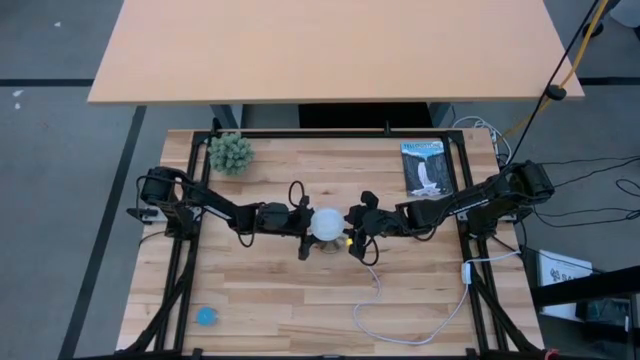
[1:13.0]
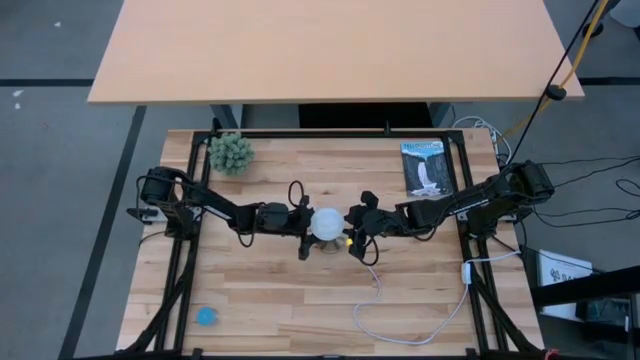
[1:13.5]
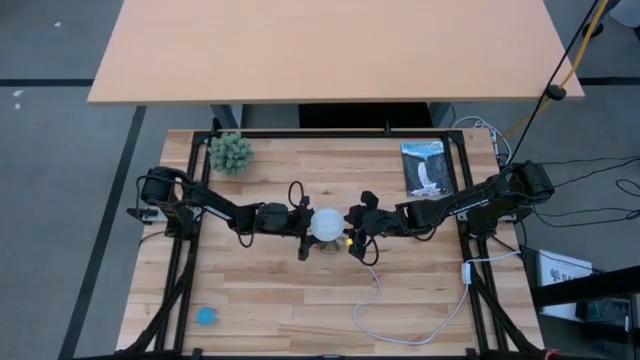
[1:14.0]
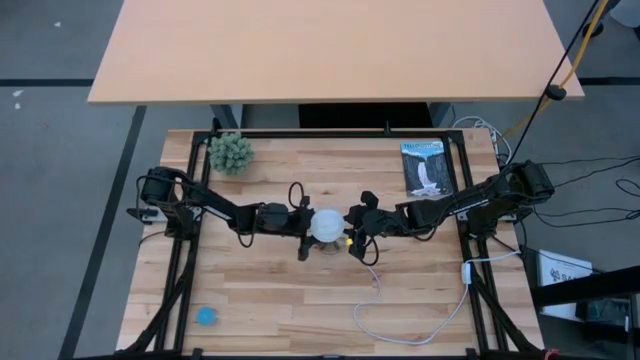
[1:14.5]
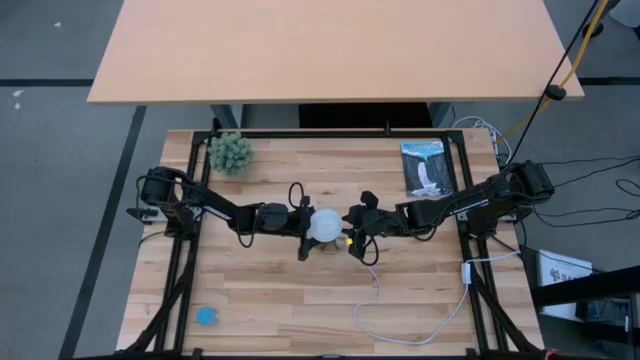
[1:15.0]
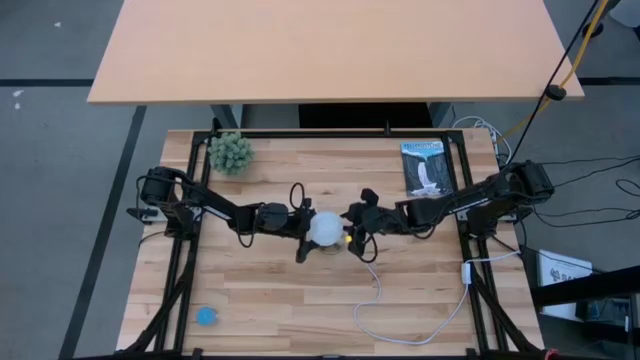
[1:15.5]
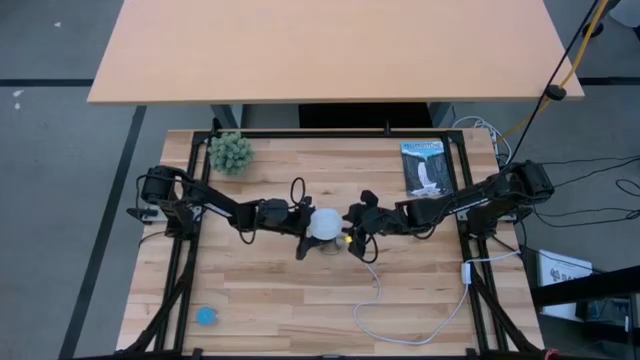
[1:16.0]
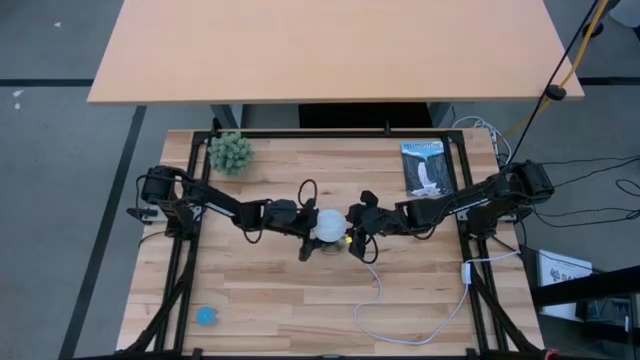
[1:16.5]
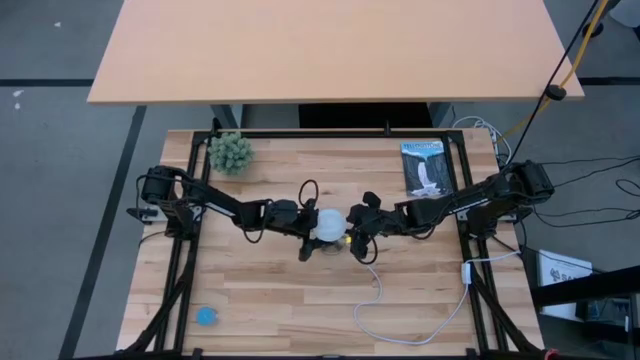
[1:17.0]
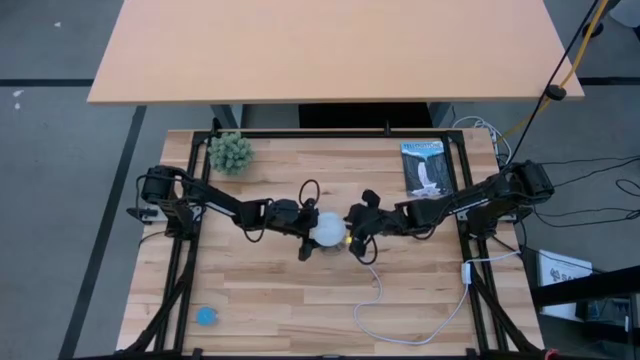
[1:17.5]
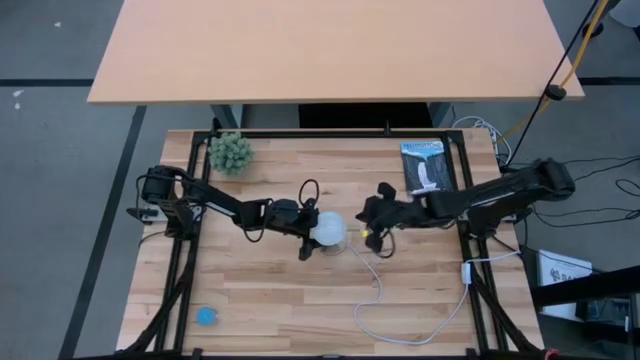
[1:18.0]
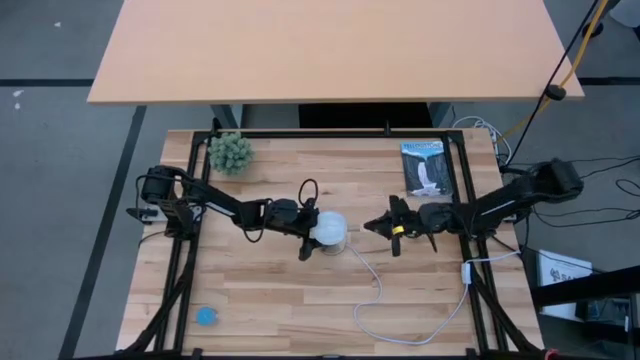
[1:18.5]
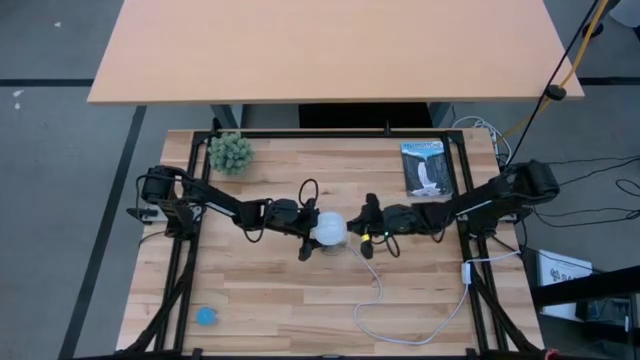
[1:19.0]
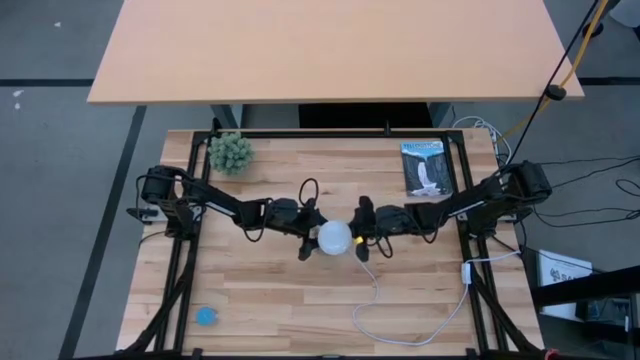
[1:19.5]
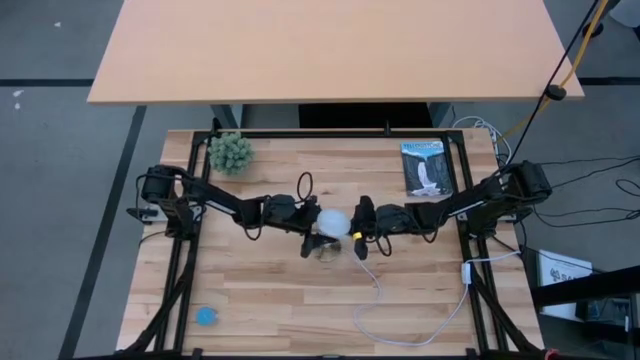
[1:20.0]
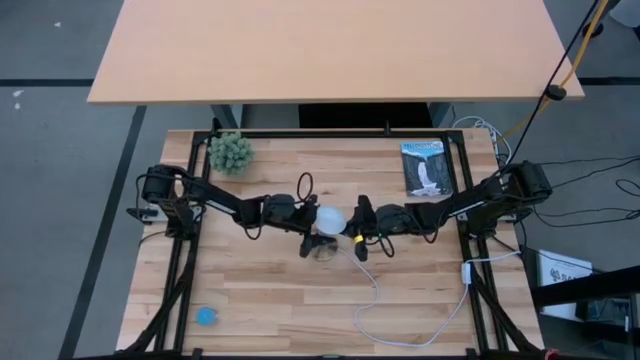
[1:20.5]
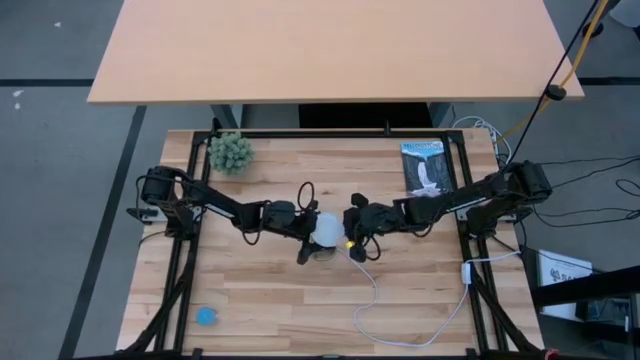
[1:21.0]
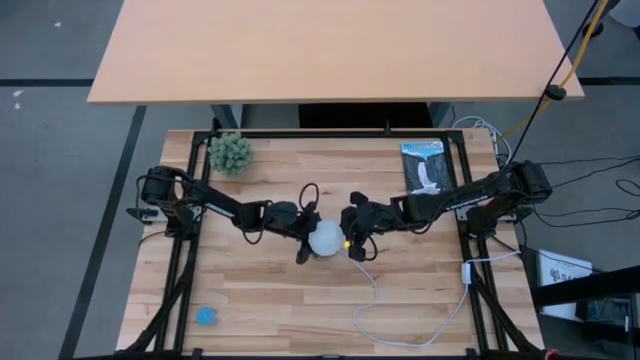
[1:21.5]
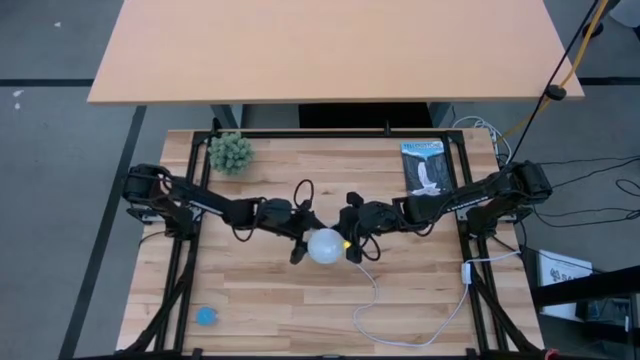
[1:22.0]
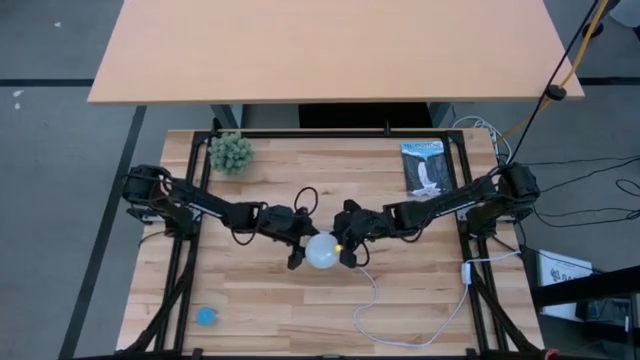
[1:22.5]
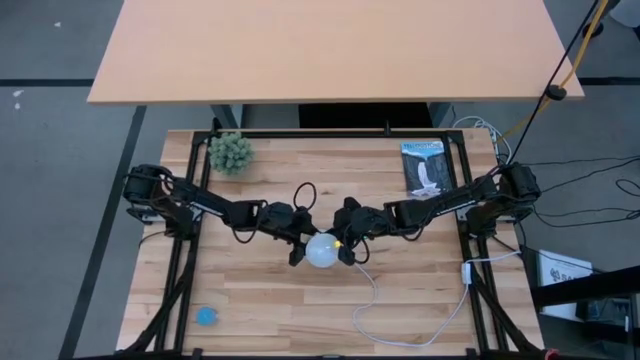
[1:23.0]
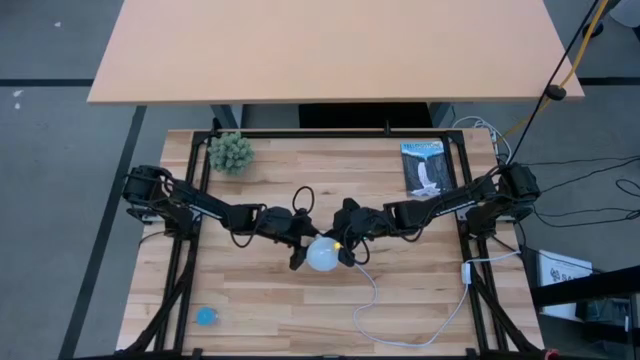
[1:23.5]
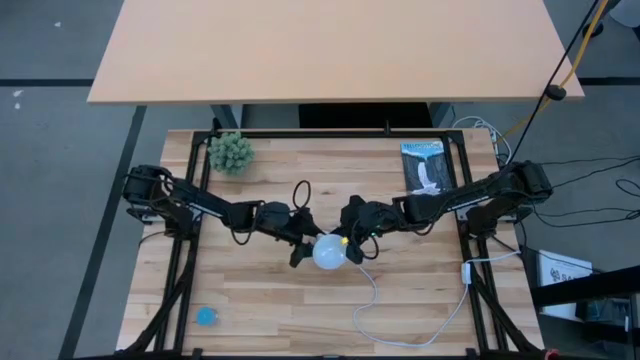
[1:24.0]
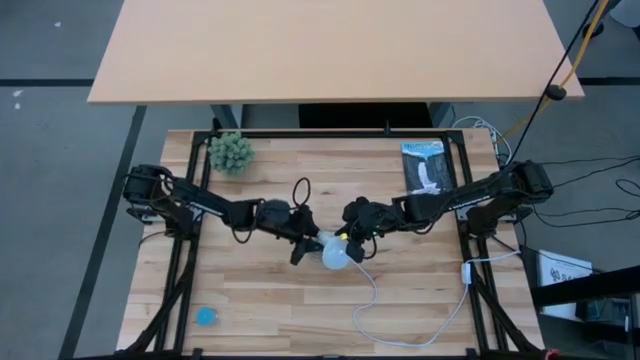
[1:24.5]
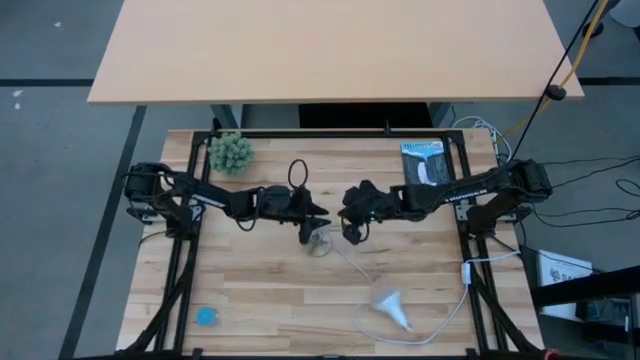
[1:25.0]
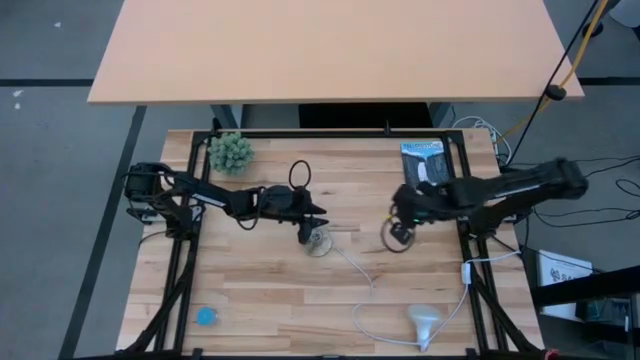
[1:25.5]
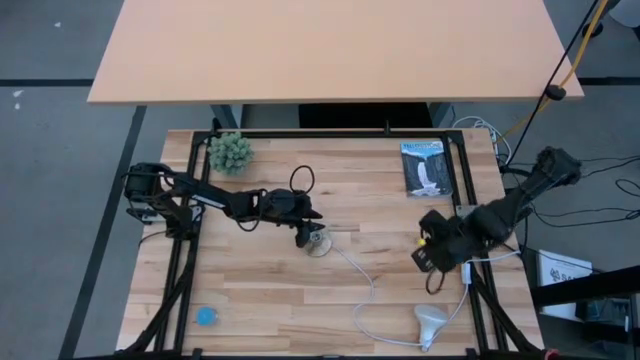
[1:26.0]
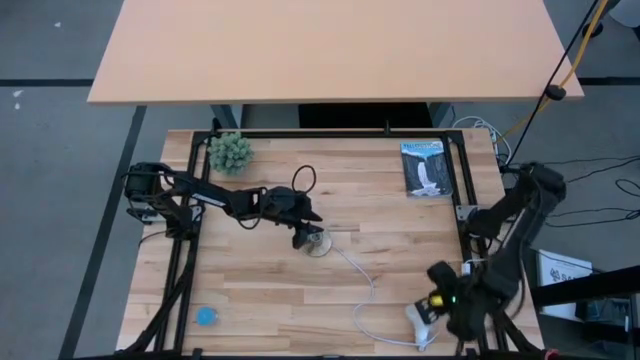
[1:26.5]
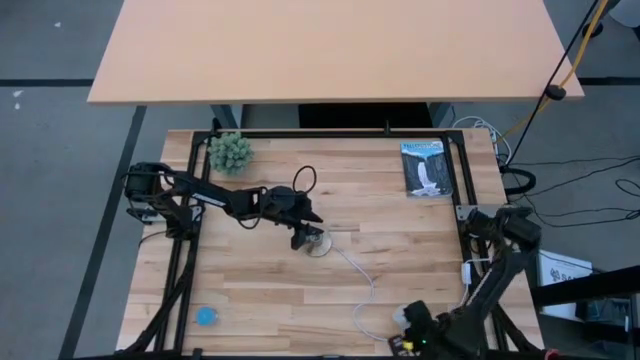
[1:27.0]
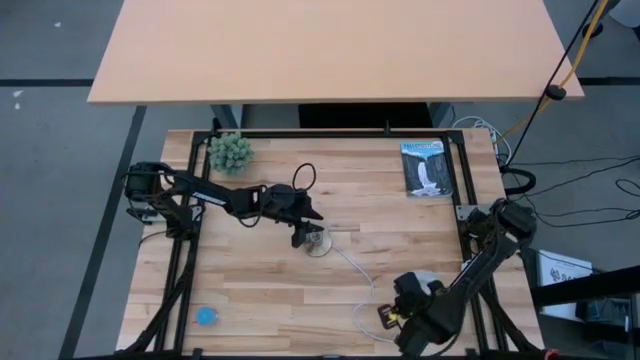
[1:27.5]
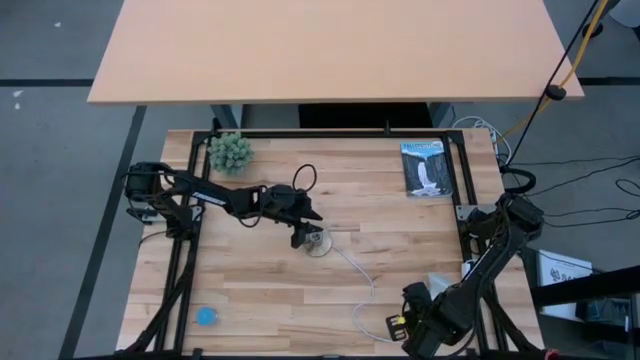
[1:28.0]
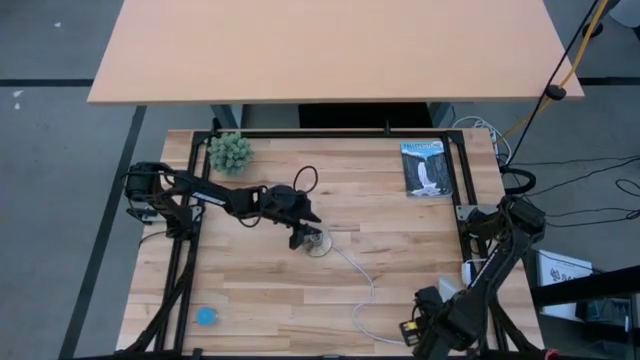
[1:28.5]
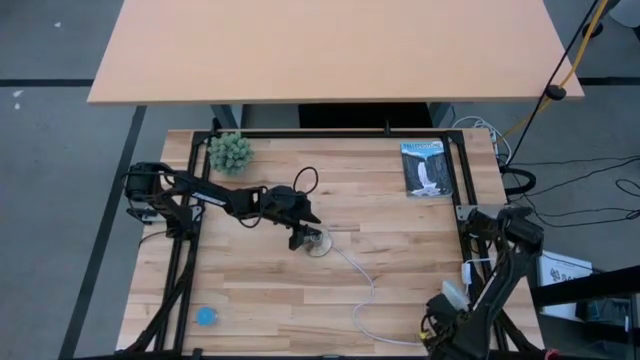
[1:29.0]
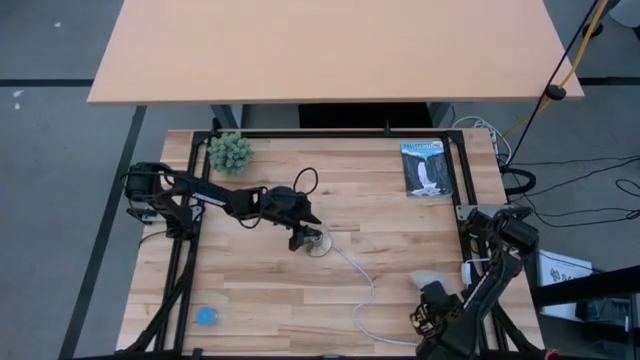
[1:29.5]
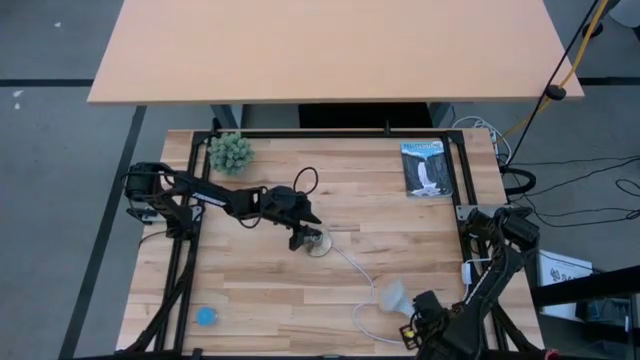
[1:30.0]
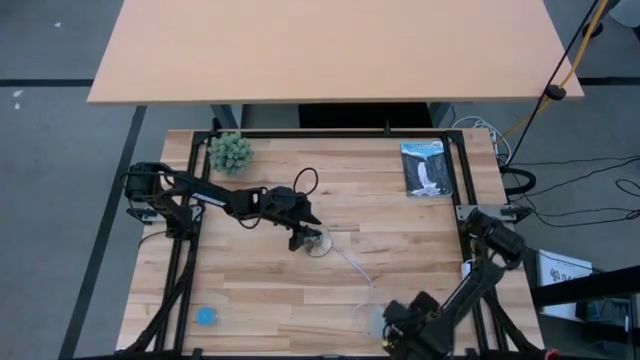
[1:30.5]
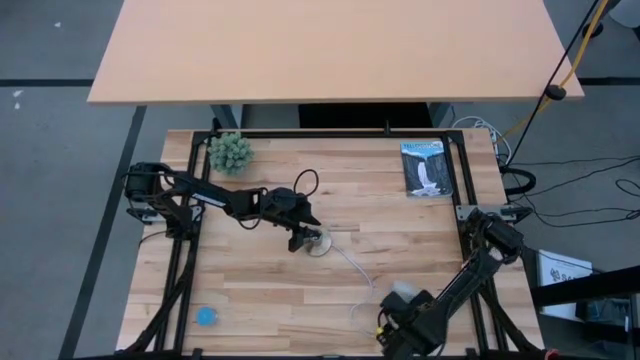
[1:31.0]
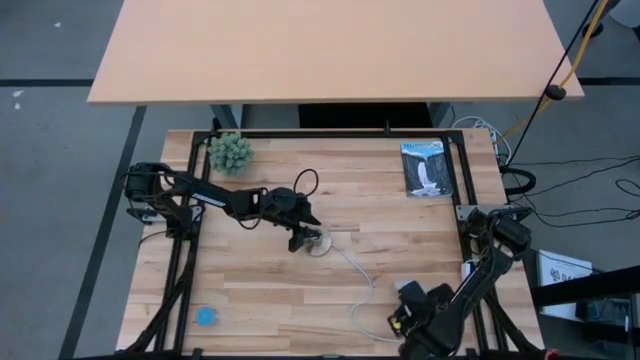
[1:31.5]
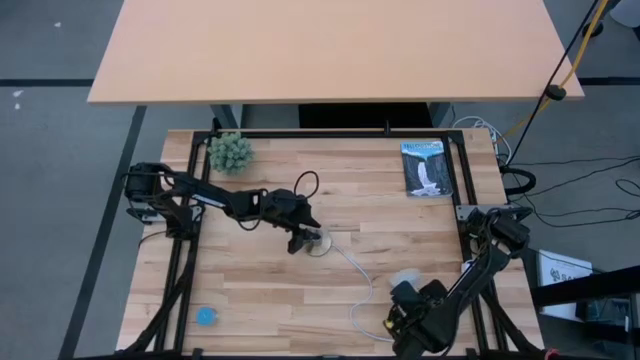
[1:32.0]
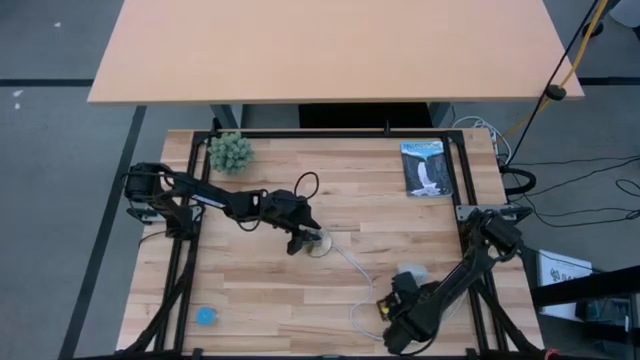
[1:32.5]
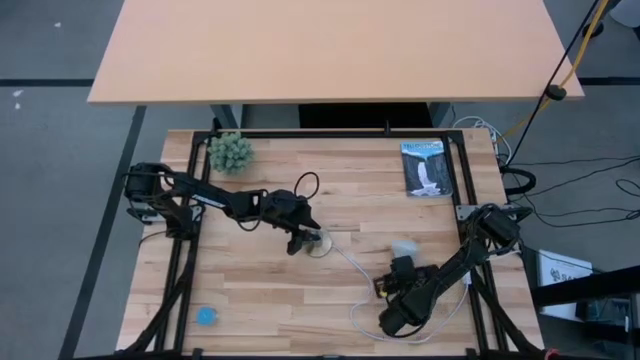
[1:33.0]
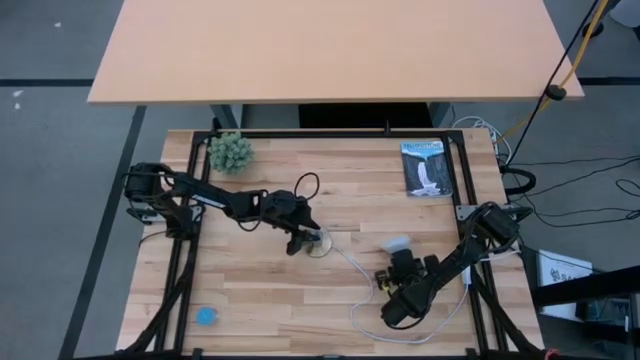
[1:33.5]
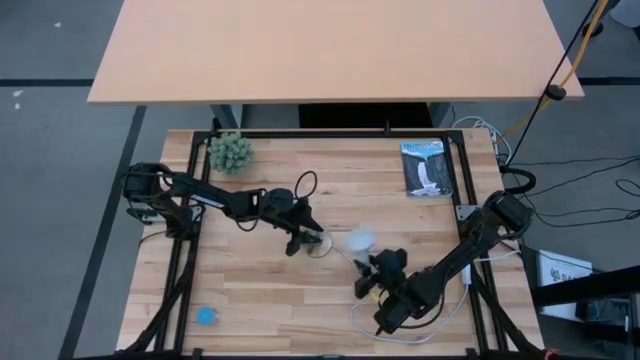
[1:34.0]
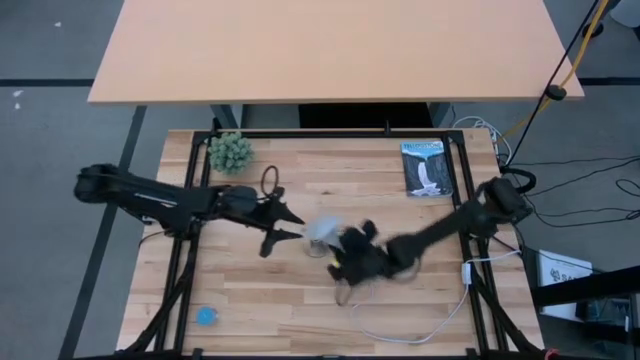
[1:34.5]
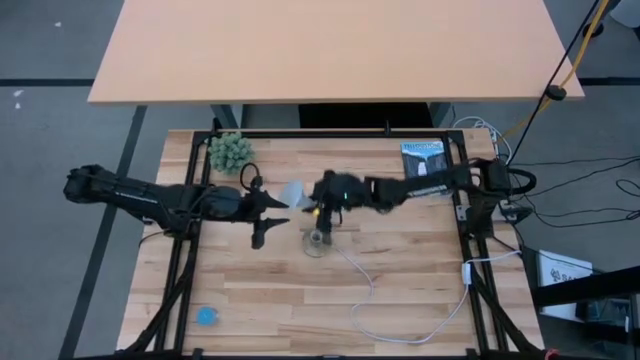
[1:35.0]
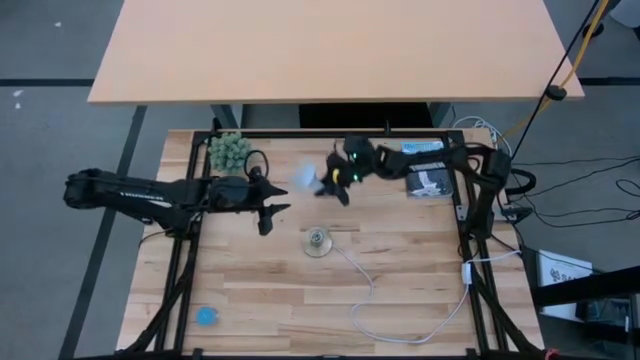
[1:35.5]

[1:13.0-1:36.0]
Task: Screw lightbulb
Insert the white light bulb into the gold lamp
